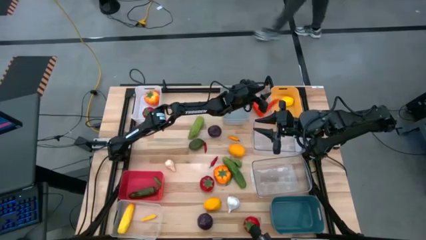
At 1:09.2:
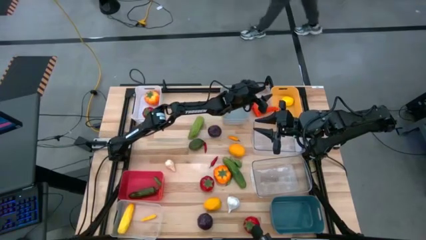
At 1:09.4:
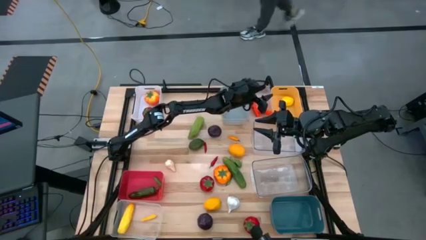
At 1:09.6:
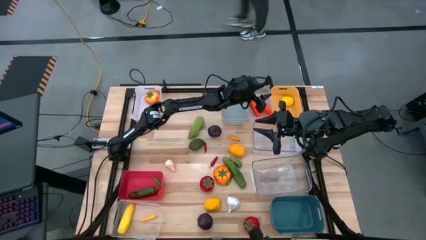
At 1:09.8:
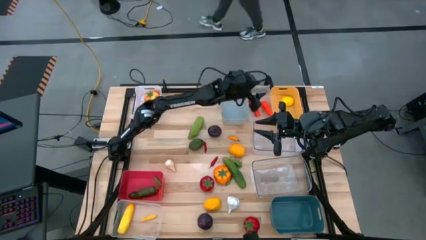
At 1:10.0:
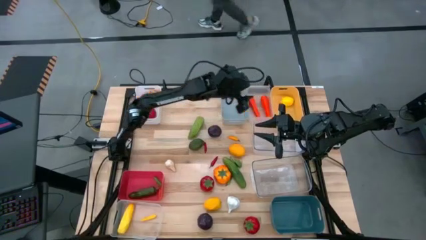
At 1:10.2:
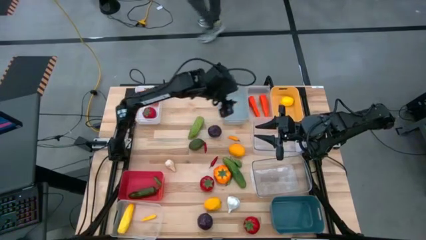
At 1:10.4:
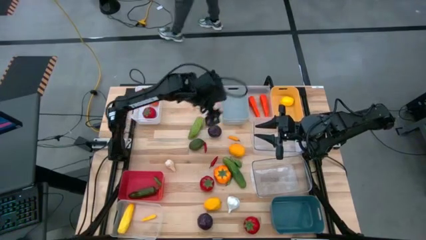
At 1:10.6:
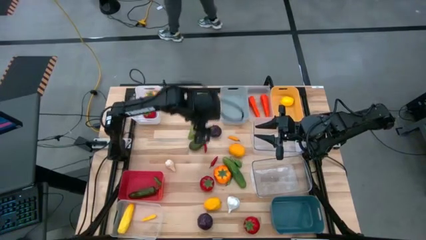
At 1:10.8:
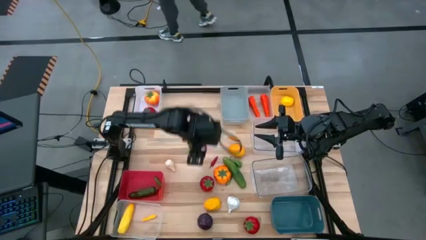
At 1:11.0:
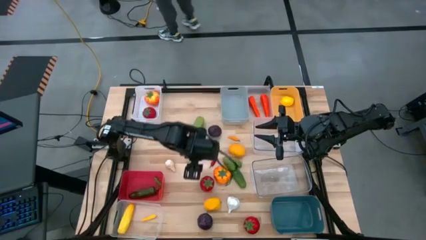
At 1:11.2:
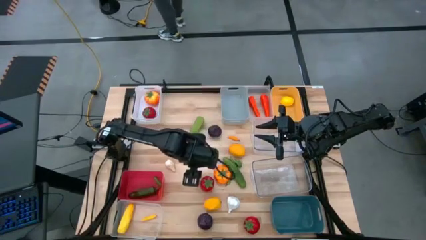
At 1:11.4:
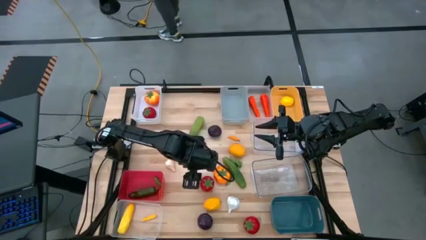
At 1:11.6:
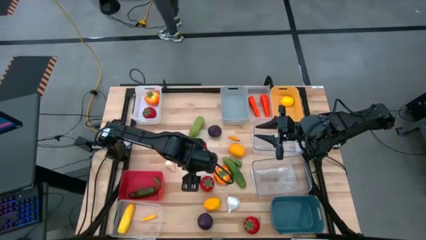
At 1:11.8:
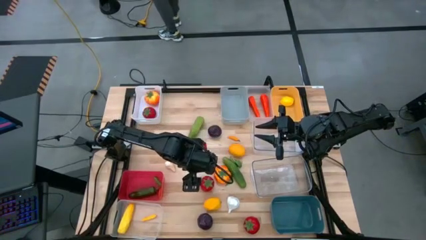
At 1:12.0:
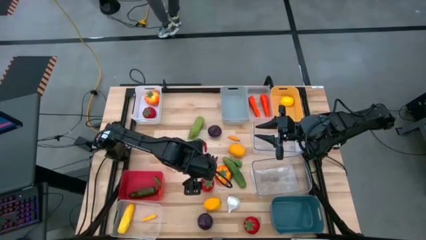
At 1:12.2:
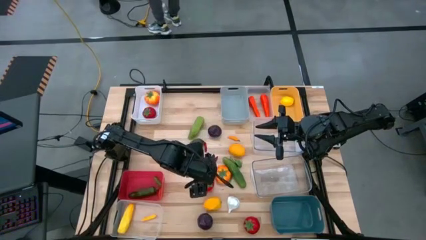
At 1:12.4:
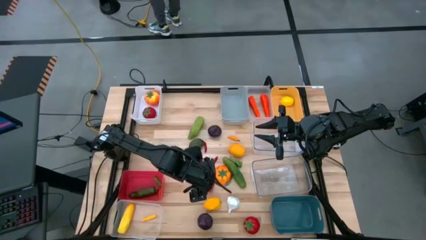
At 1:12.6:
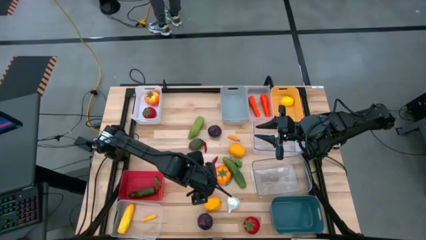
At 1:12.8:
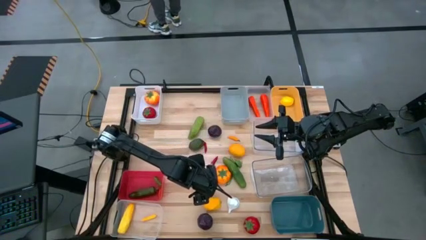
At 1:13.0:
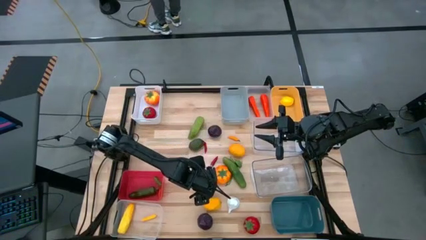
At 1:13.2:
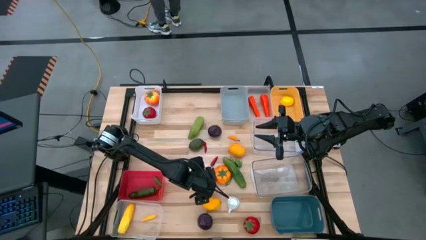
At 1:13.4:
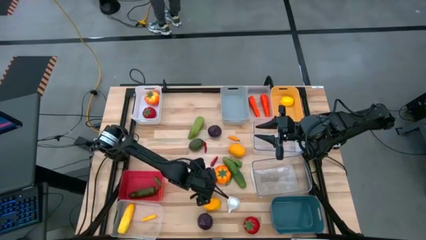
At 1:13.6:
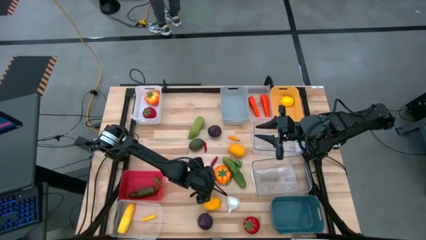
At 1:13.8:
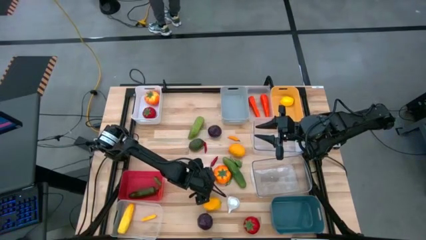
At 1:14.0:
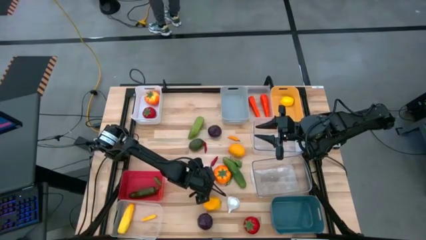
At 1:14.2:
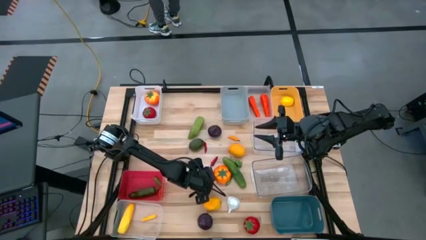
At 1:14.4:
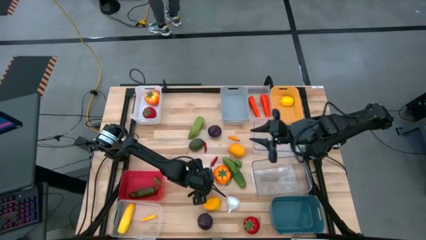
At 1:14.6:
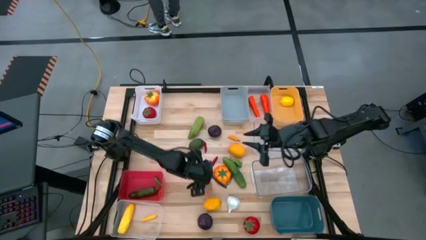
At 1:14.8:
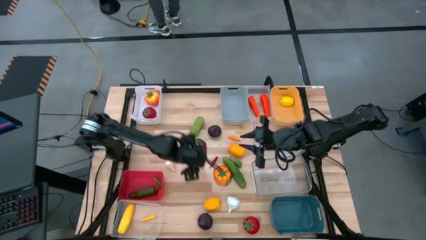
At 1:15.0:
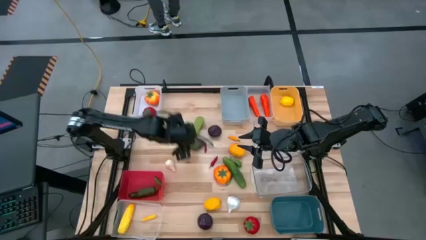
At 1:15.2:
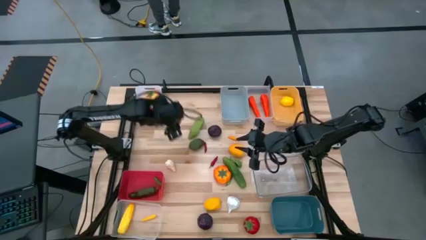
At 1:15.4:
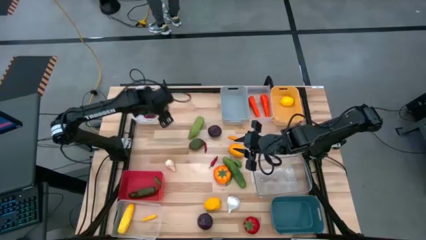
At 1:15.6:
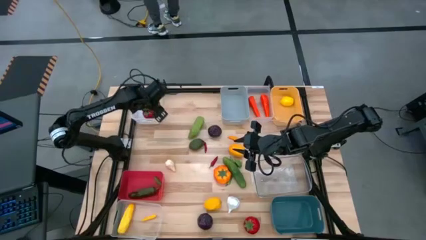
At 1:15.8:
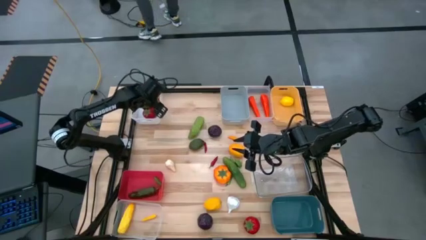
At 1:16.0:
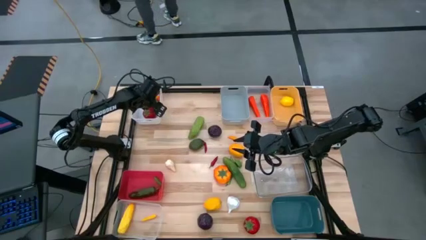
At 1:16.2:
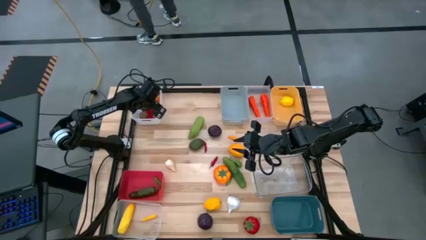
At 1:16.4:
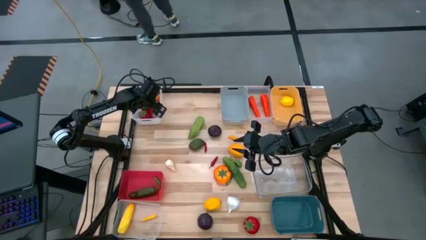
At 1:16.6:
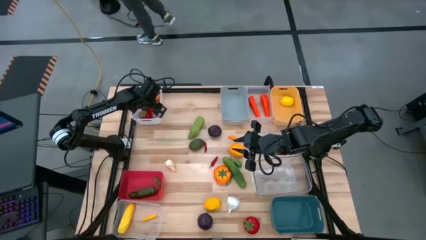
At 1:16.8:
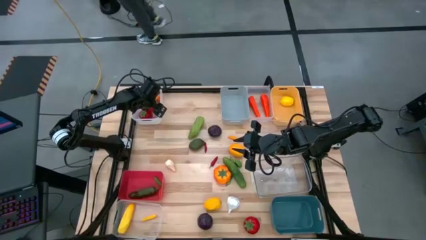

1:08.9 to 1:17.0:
Task: Sort produce into baskets
Put the top red tomato into the white bin

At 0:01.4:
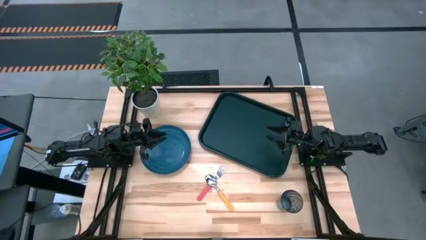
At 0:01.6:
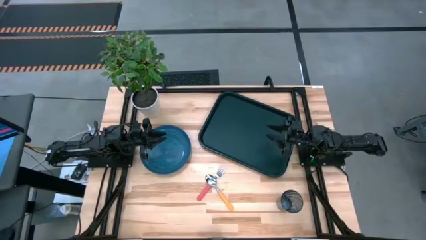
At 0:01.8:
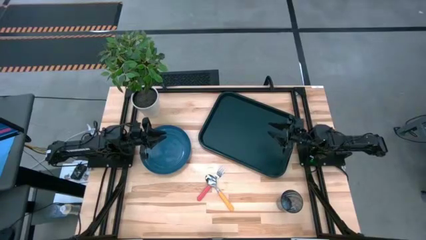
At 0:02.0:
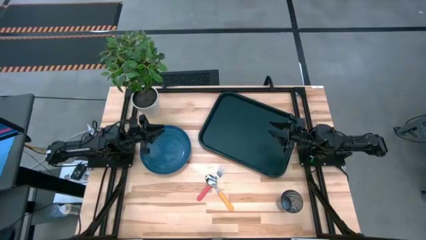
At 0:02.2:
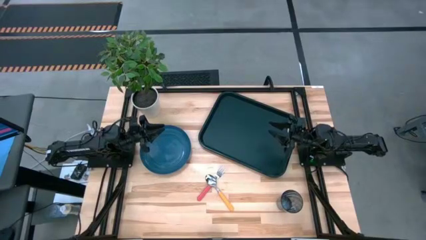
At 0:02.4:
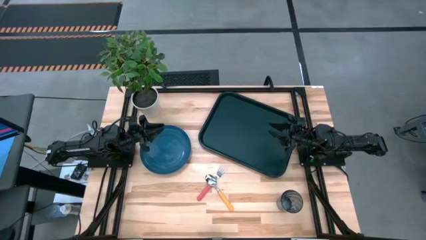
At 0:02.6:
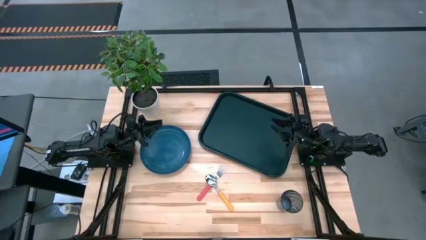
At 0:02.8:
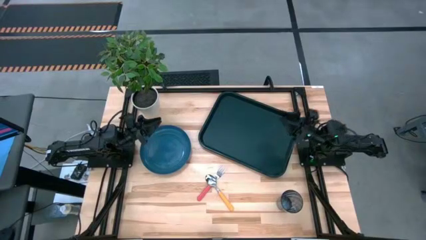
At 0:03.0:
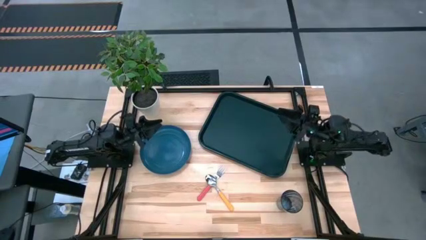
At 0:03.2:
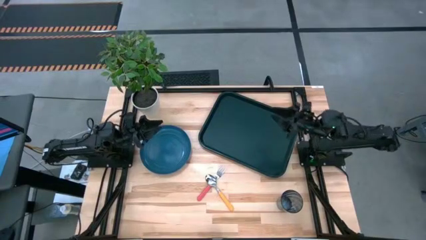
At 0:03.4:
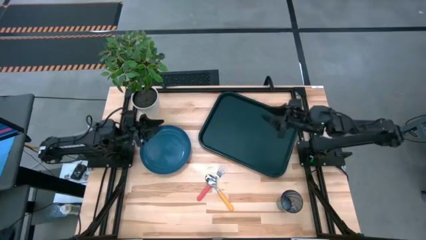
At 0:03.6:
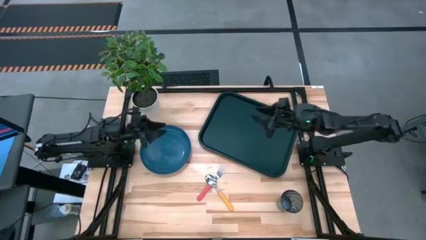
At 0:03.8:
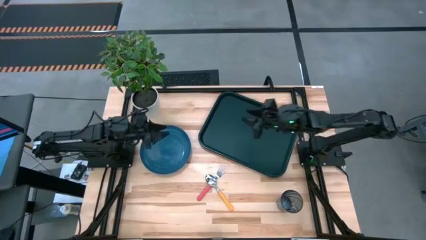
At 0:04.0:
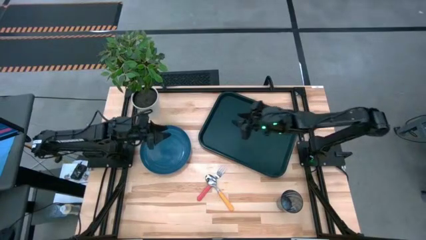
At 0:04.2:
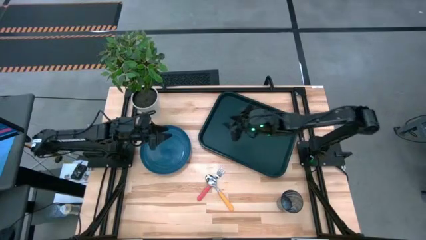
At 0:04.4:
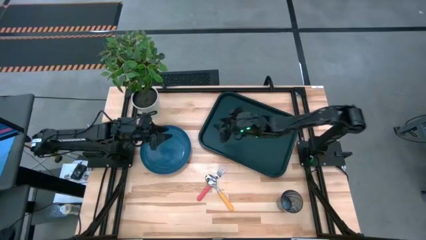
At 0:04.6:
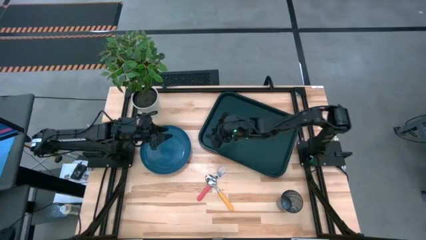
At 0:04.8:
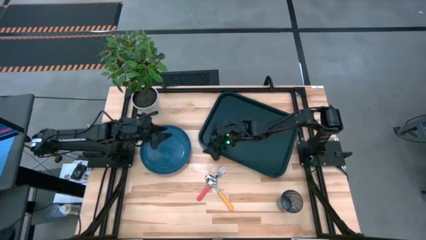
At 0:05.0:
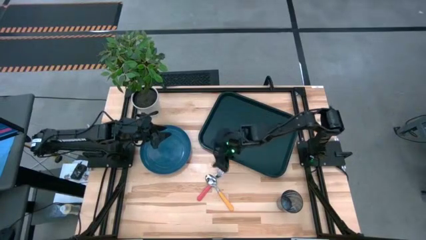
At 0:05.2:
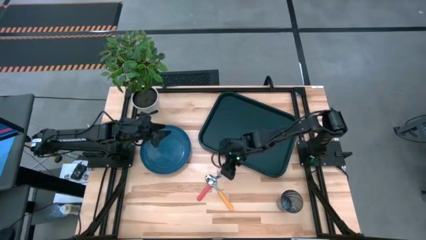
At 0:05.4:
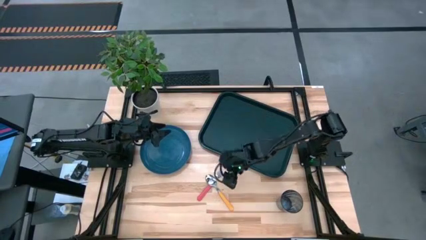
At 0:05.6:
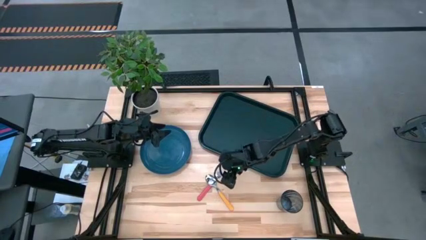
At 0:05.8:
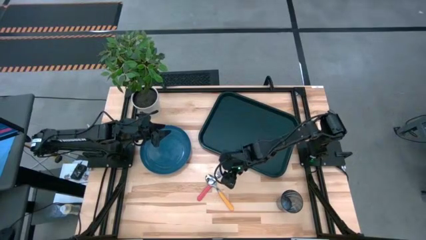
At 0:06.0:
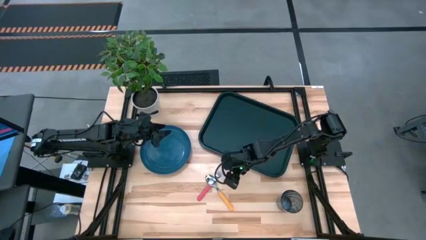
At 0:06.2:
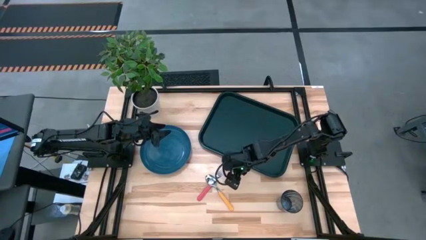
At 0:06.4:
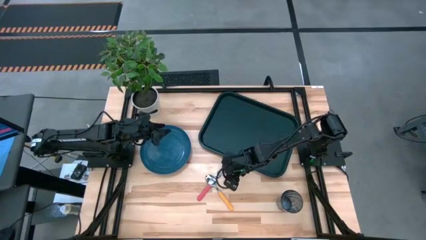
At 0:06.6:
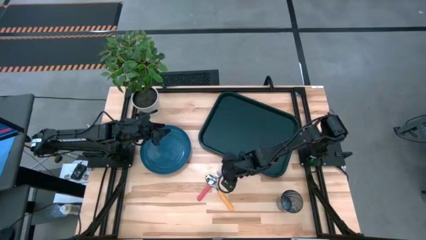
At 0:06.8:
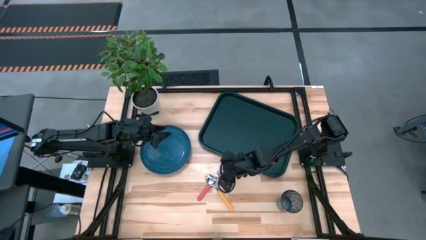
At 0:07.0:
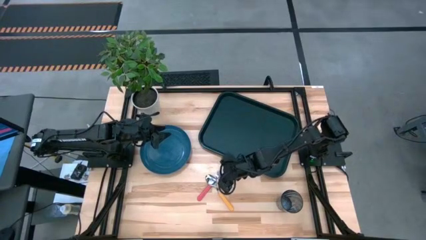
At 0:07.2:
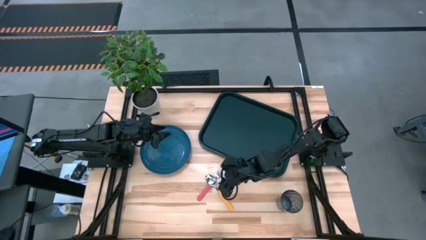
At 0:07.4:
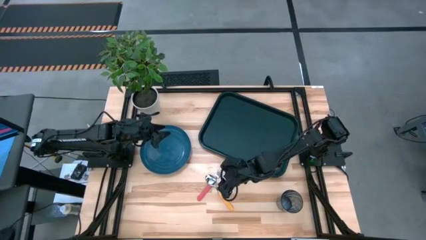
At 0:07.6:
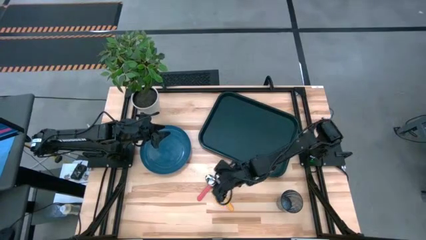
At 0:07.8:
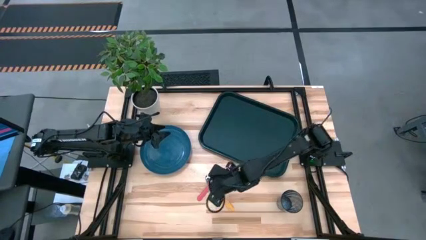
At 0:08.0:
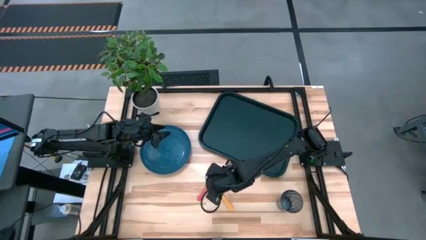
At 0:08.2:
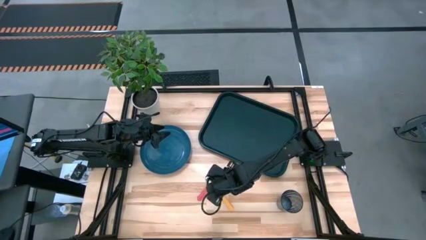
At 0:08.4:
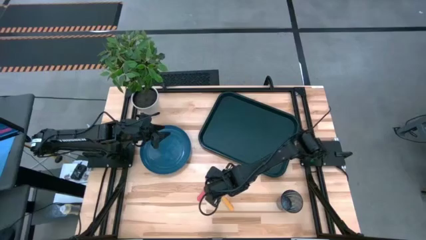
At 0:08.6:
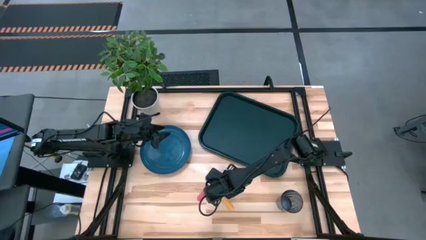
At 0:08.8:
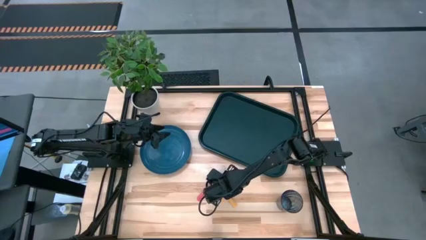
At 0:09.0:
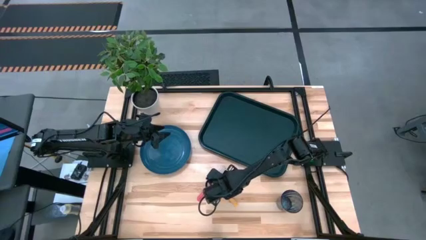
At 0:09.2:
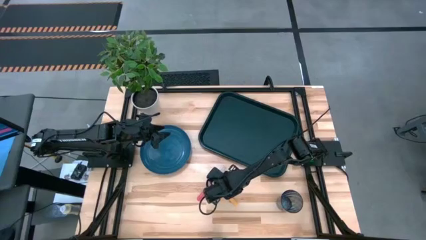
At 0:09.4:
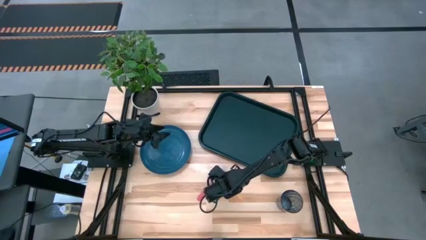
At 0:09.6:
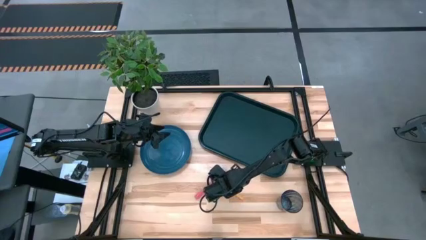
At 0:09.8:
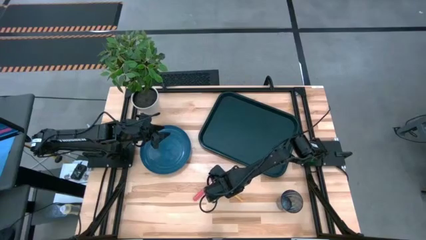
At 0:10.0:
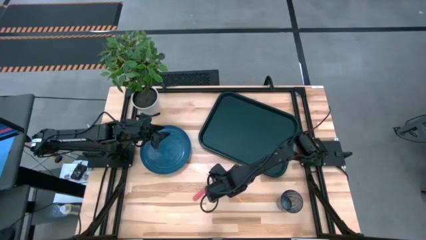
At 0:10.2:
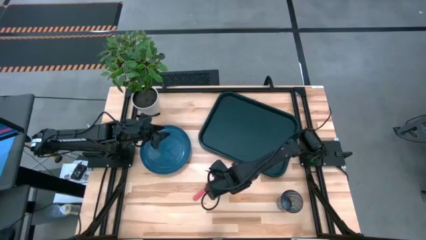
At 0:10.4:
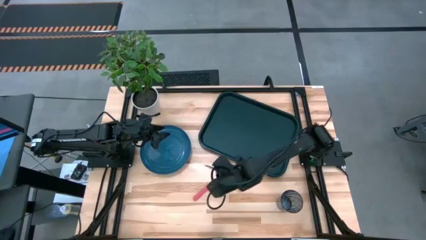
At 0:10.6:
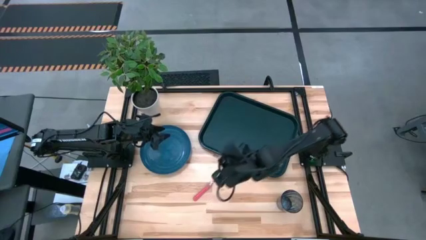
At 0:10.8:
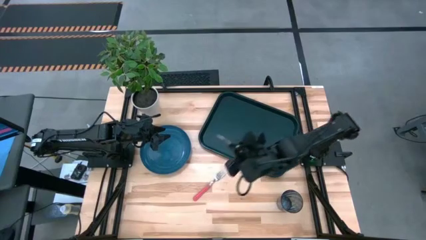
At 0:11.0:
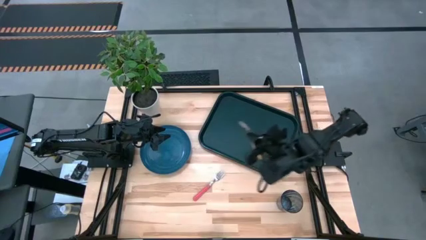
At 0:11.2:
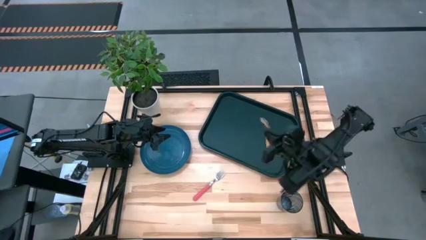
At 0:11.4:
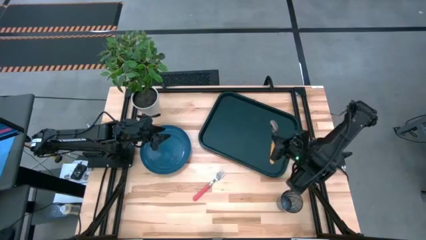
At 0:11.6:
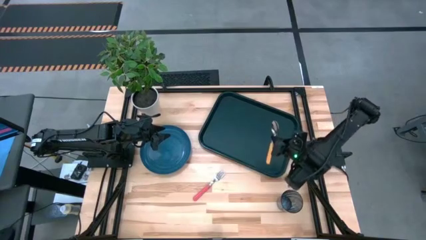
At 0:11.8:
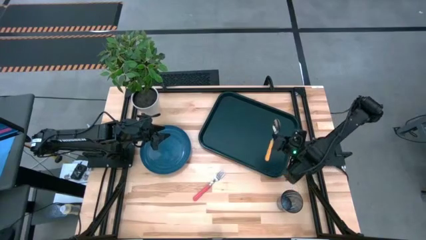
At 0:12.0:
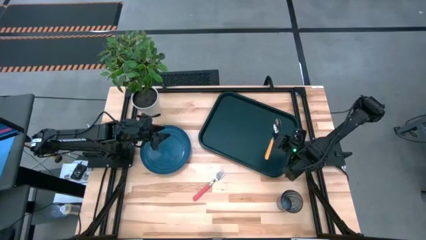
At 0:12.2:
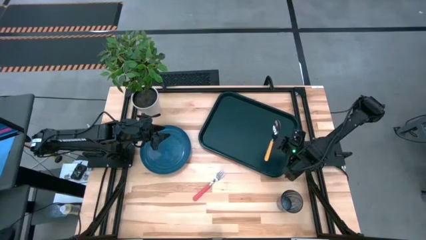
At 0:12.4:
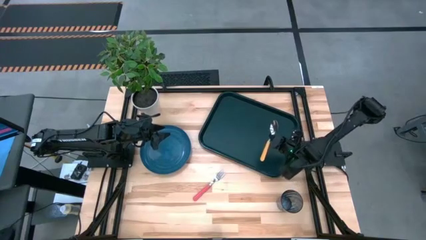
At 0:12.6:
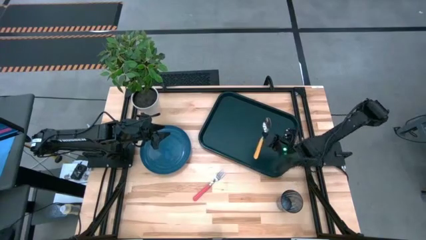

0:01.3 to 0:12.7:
Task: Pick and place plate/cup/fork/spoon on tray
Put the orange spoon on the black tray
